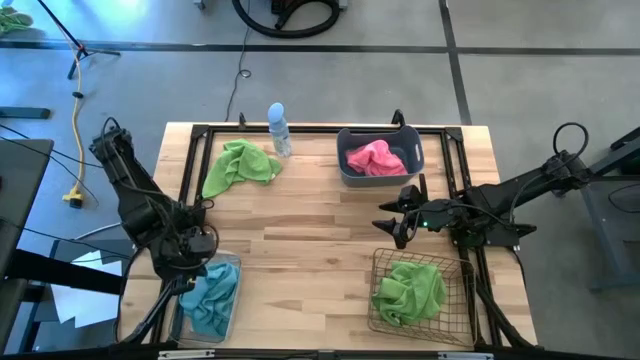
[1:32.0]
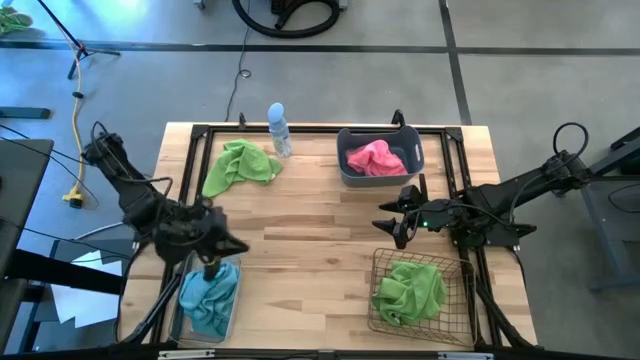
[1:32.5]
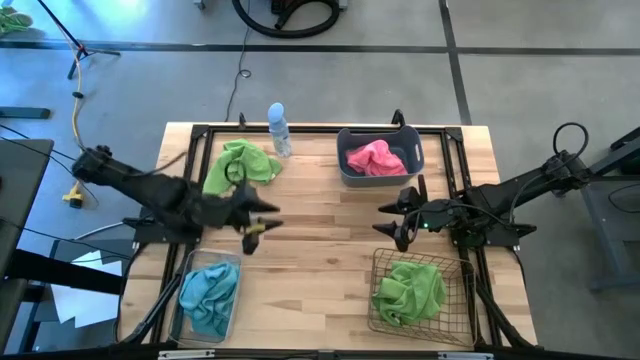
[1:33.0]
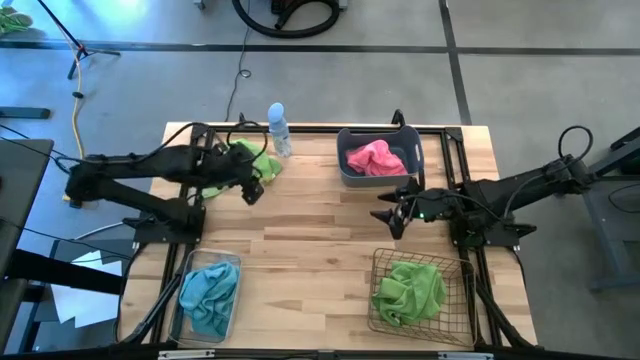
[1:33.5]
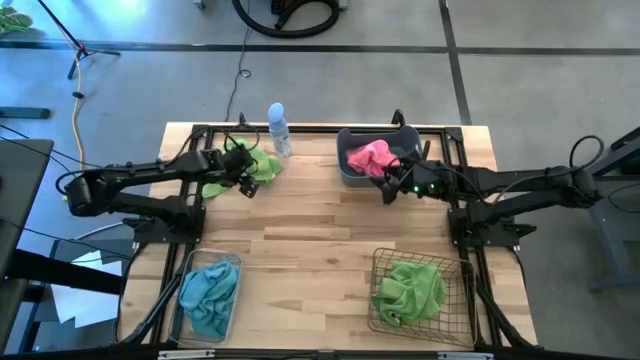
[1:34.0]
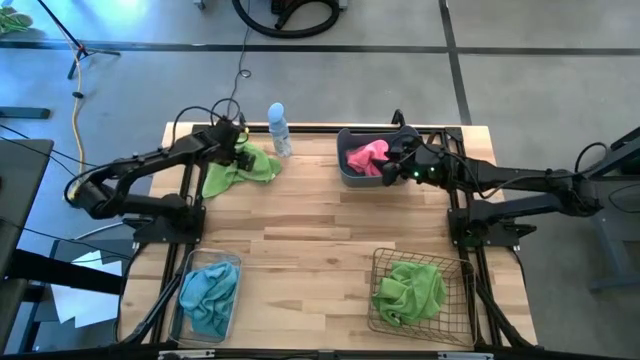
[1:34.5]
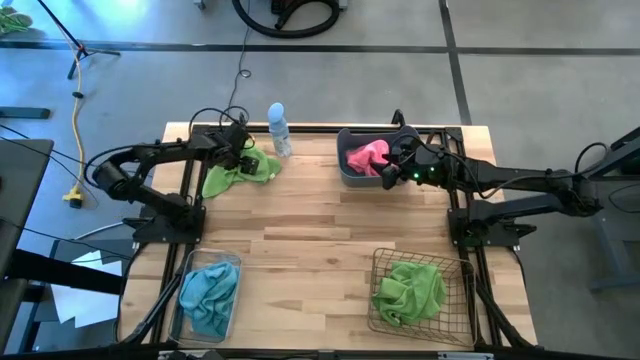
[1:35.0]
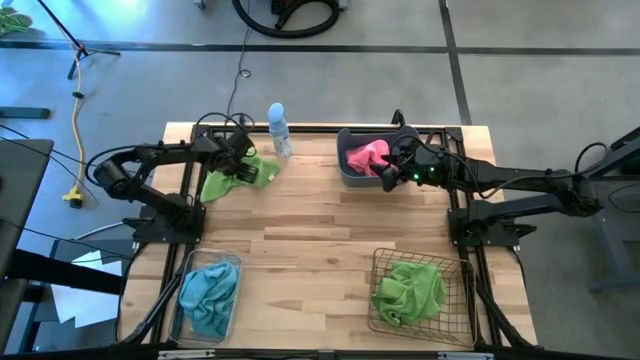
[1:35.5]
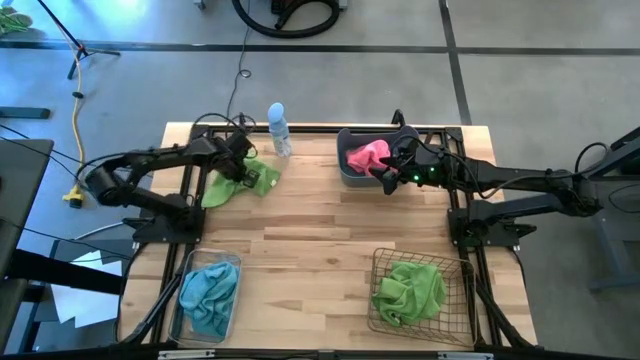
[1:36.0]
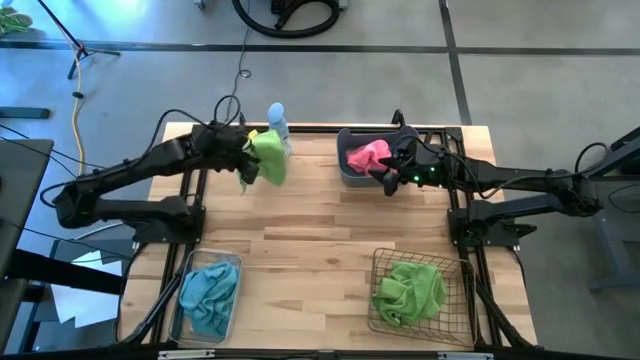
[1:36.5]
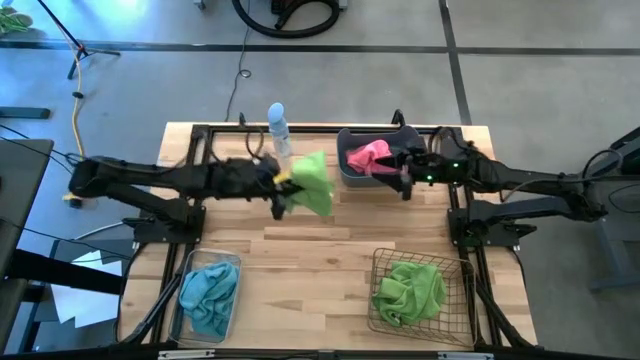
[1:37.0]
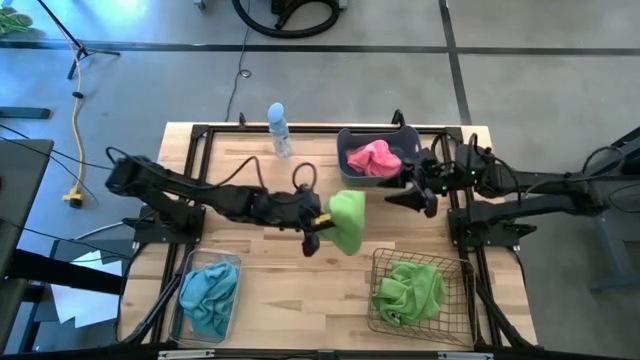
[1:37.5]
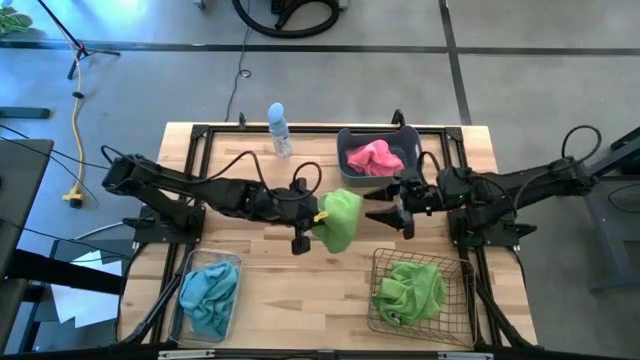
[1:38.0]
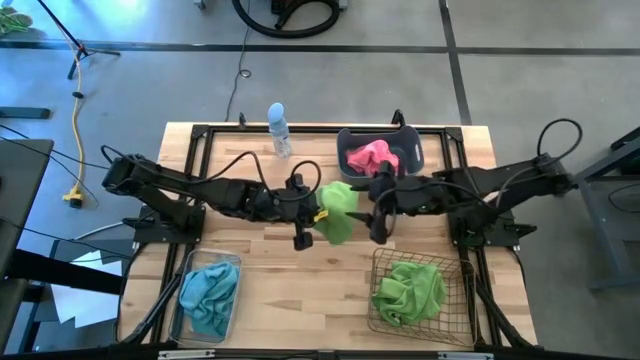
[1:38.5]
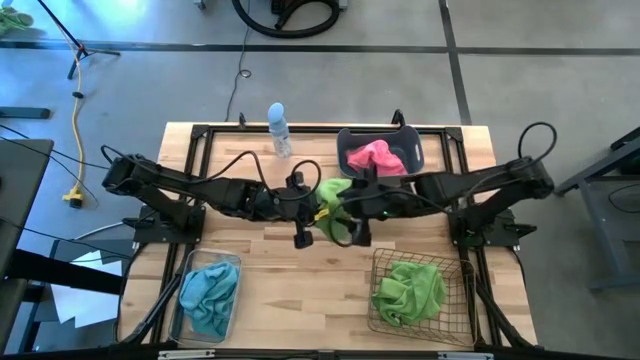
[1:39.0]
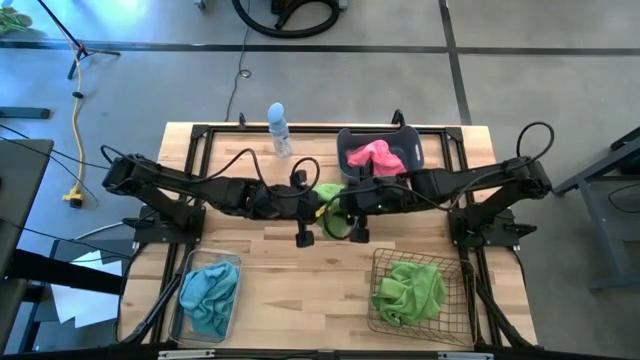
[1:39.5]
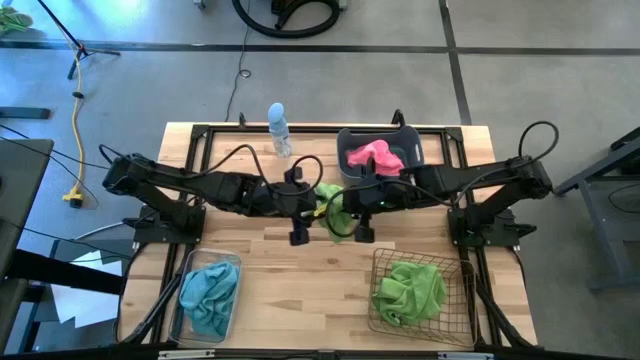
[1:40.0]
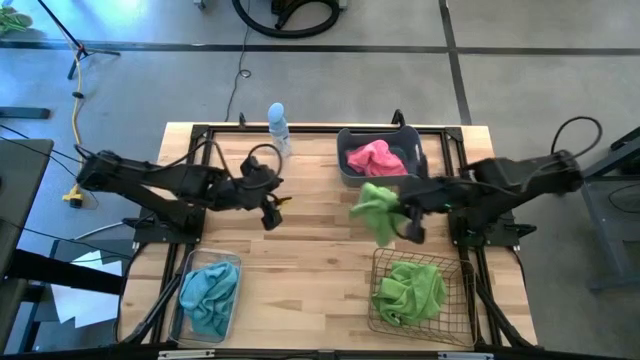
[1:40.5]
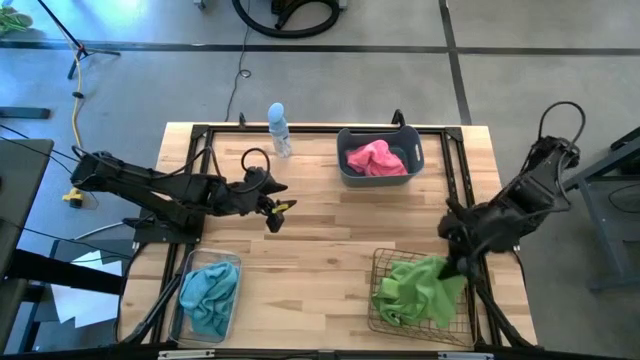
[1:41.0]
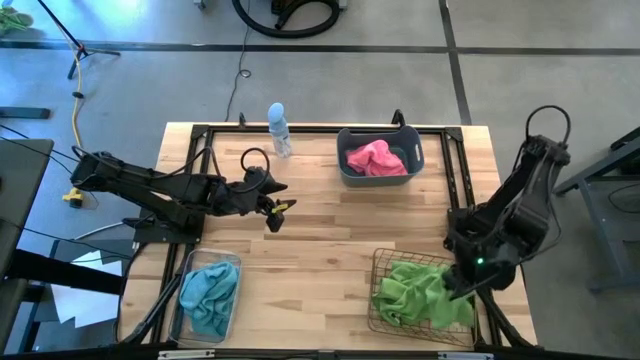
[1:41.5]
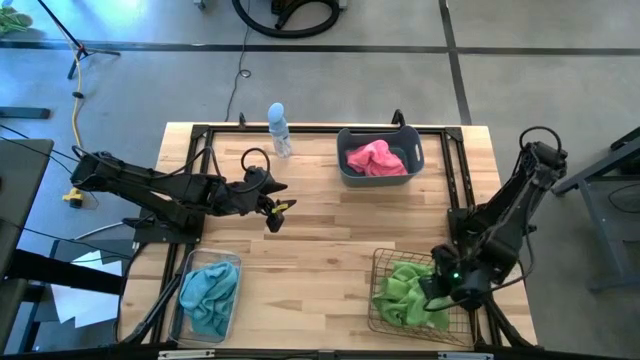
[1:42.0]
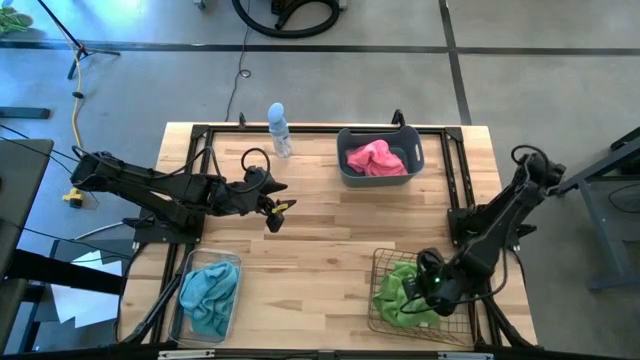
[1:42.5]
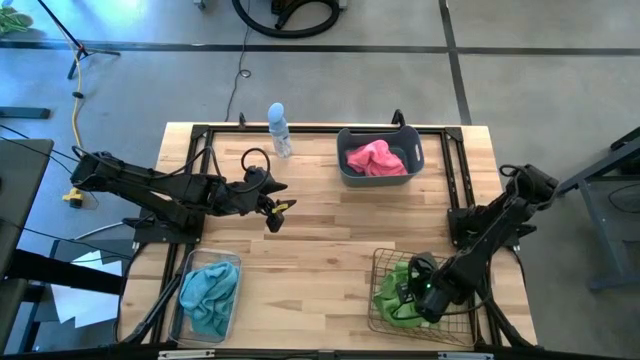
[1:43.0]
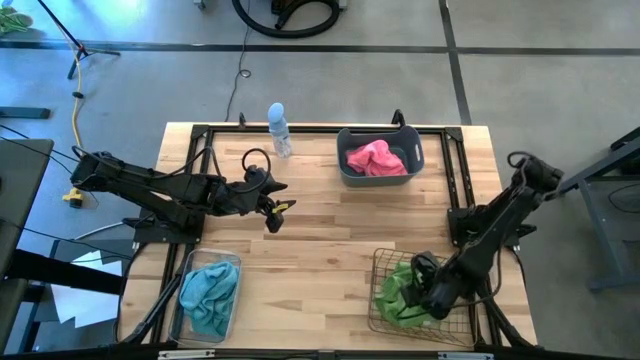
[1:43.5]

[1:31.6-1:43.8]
Task: Sort microfiber towel by color & place in baskets
Put the green microfiber towel into the wire basket

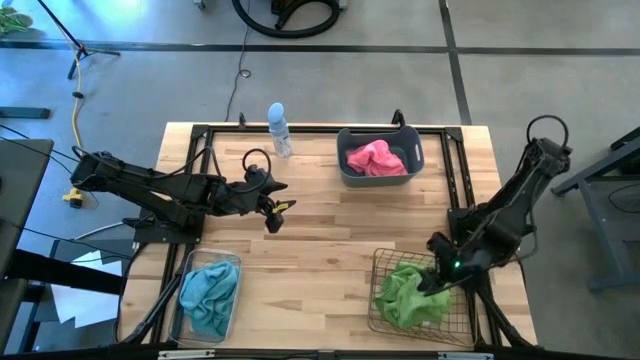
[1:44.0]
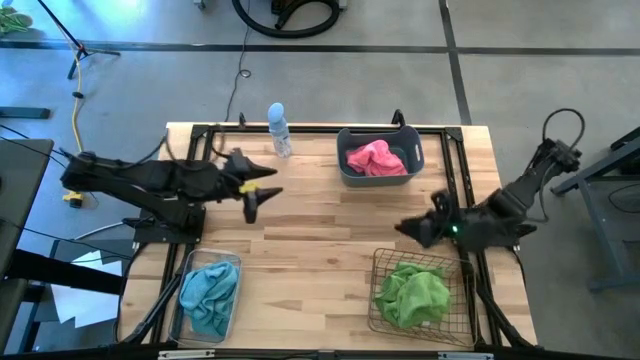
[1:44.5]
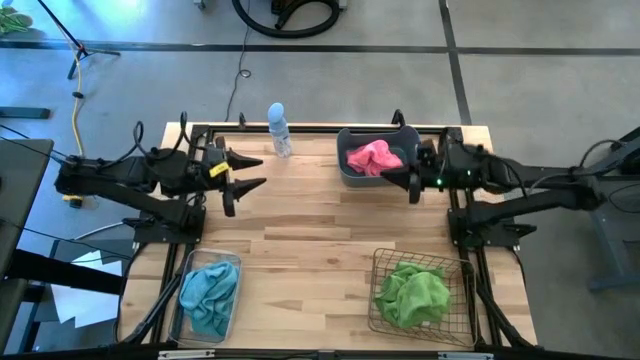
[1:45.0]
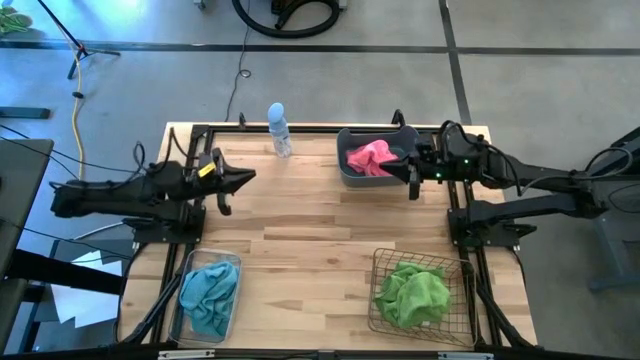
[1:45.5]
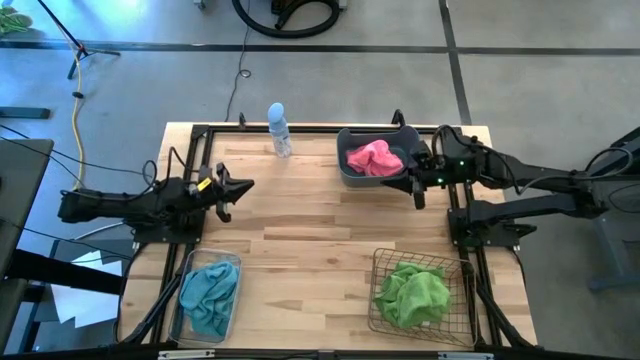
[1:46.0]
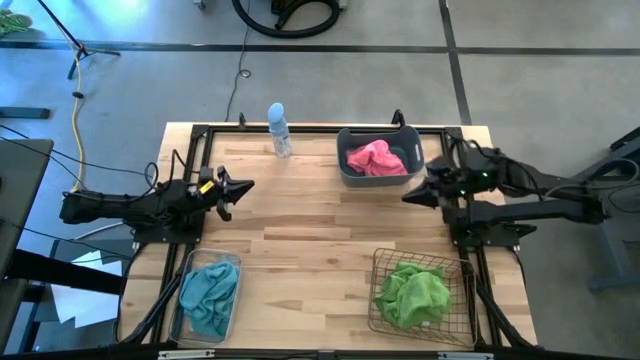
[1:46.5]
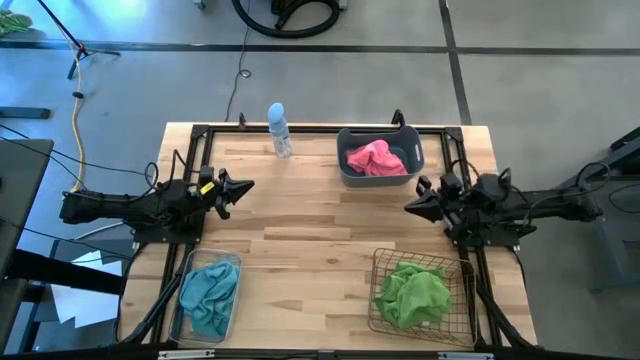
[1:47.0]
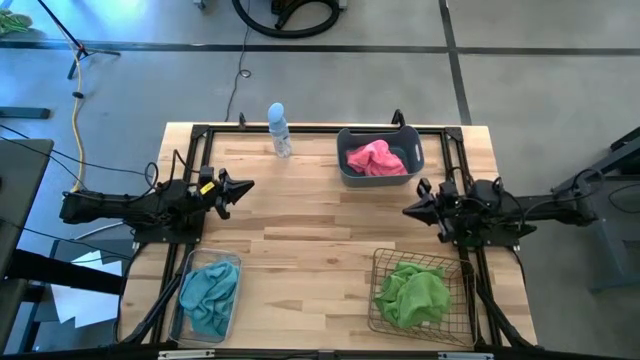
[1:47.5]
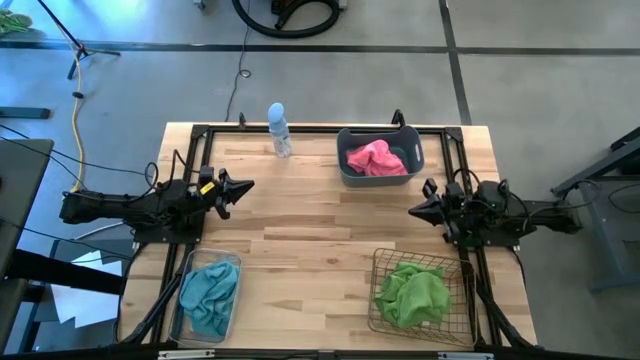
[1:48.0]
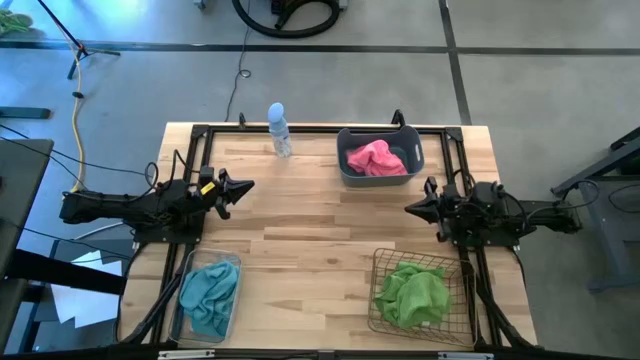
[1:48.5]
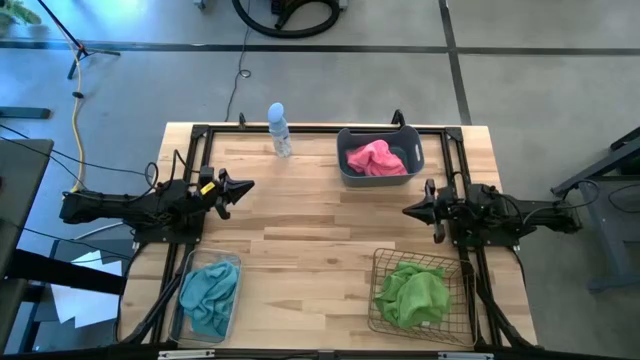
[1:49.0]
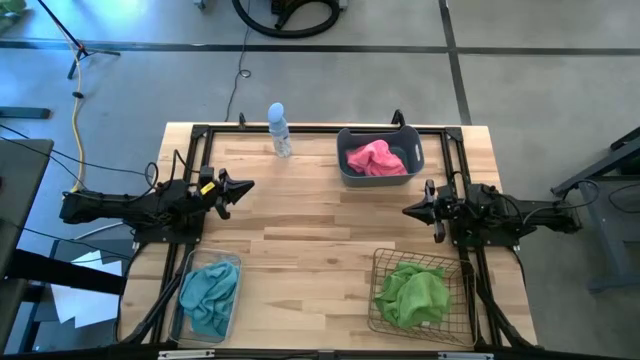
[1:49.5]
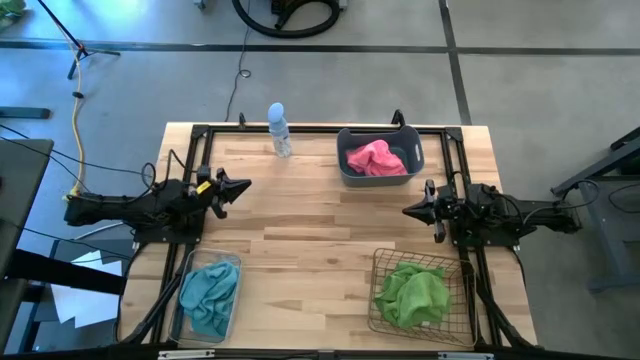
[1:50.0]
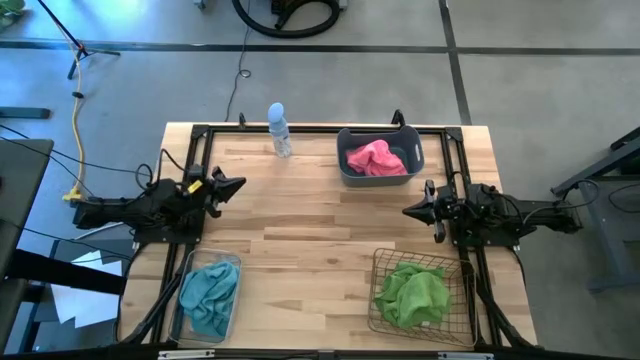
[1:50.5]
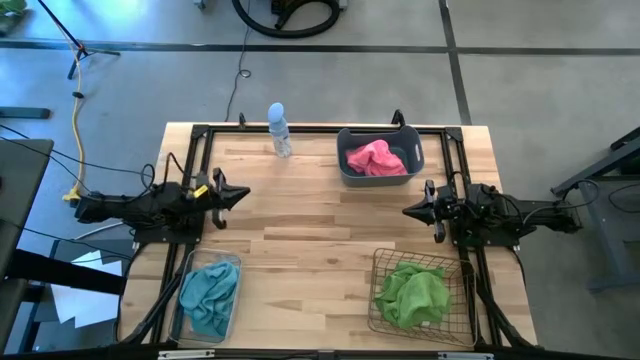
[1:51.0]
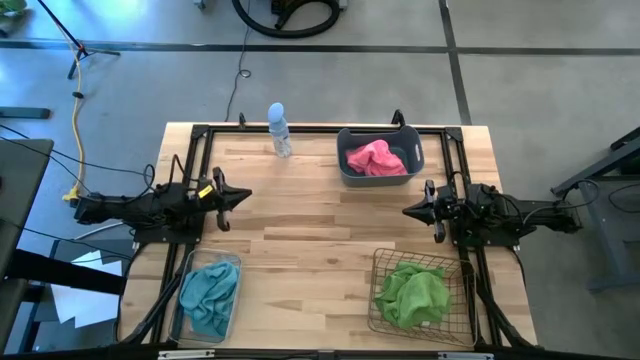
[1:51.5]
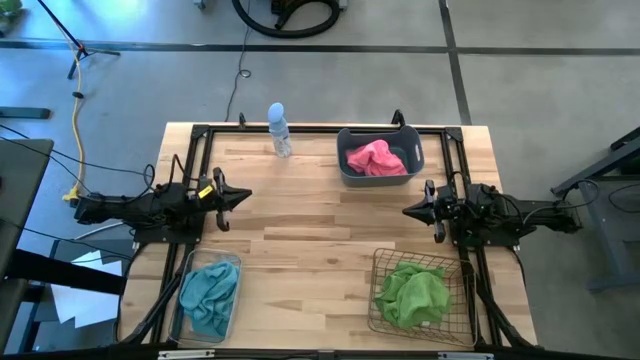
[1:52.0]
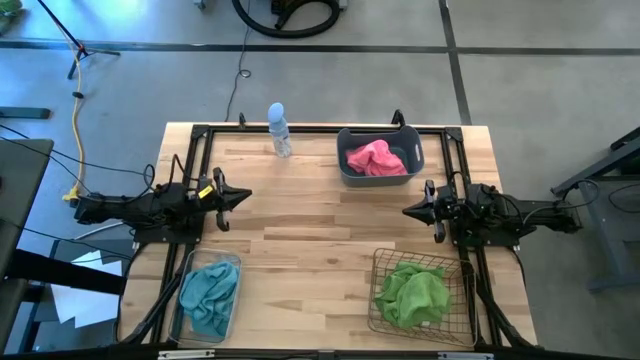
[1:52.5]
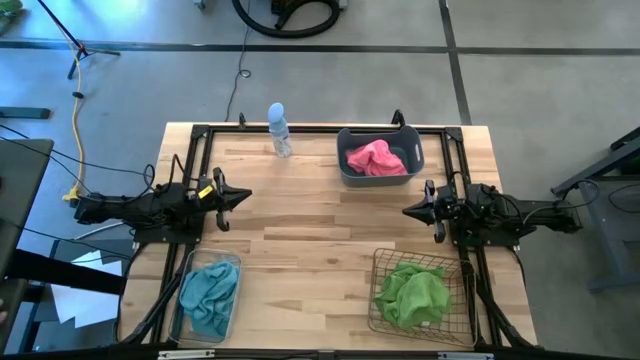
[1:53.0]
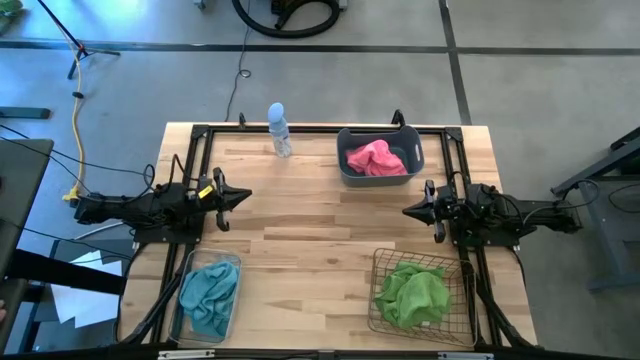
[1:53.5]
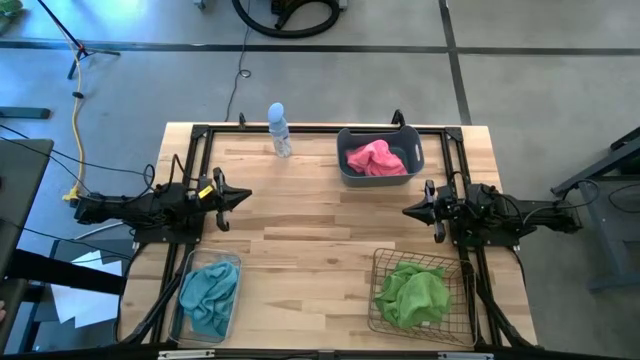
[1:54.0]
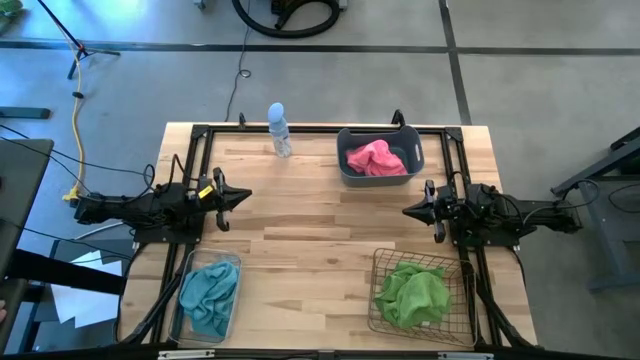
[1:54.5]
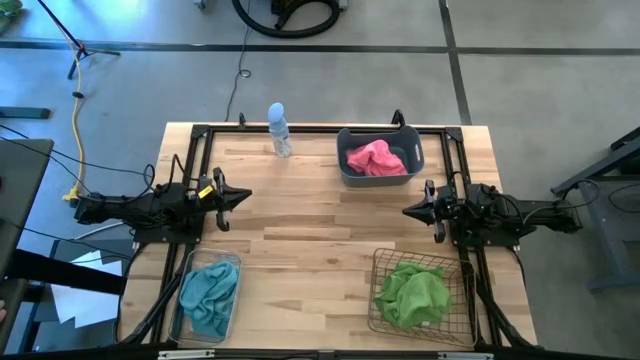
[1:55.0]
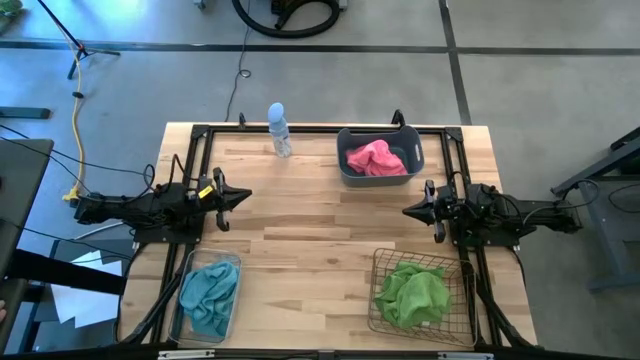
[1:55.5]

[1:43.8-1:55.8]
Return to Home Position
